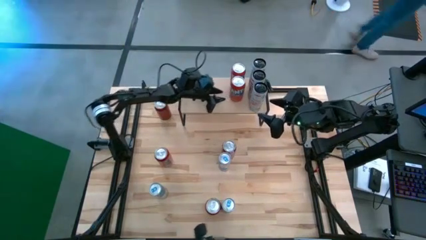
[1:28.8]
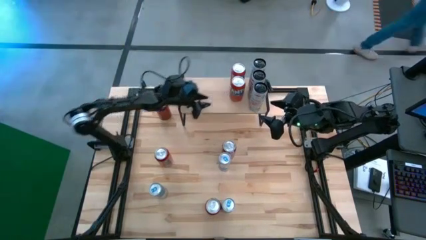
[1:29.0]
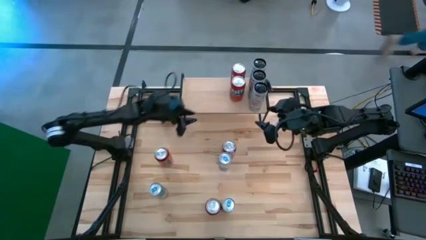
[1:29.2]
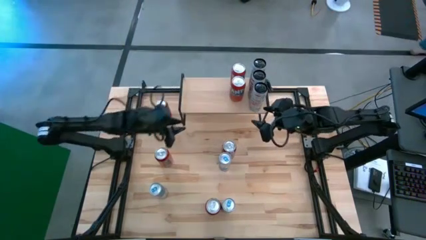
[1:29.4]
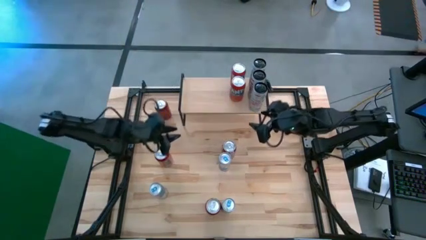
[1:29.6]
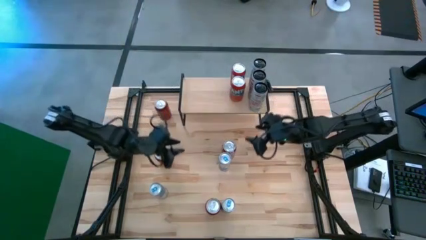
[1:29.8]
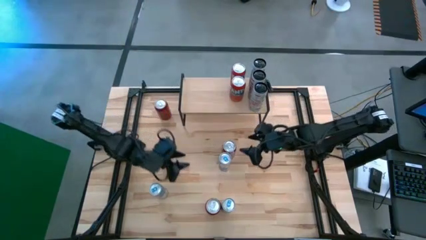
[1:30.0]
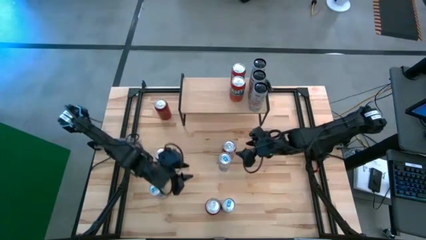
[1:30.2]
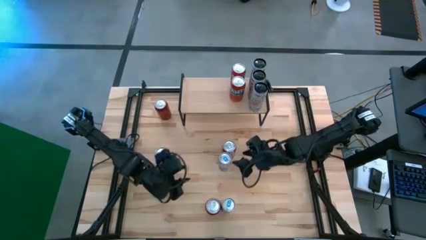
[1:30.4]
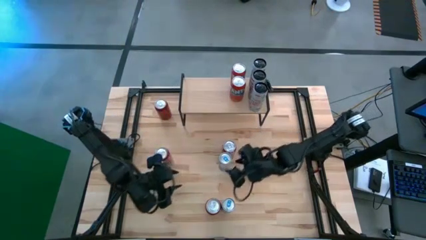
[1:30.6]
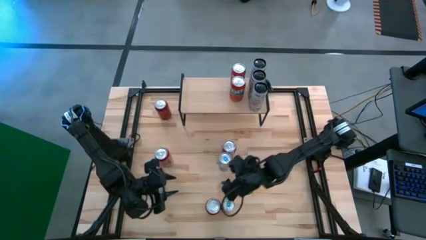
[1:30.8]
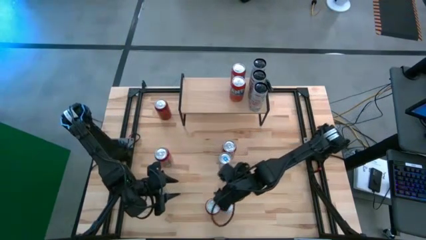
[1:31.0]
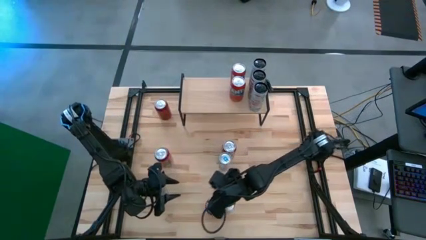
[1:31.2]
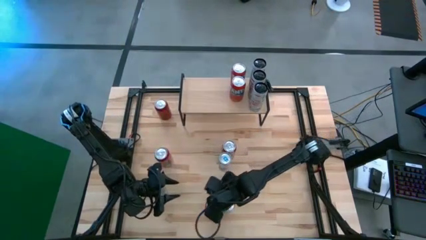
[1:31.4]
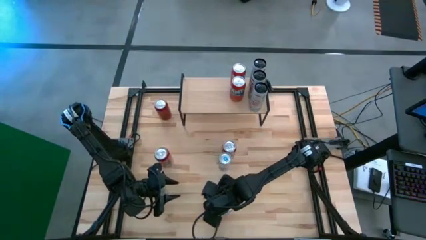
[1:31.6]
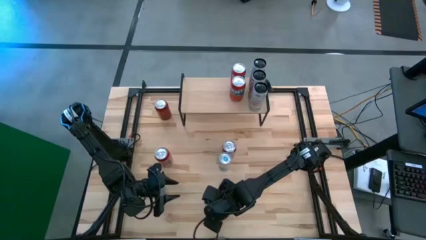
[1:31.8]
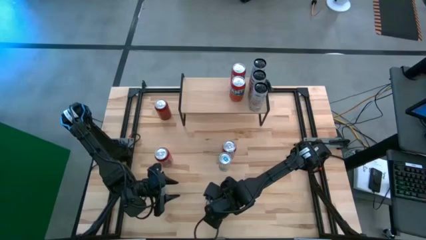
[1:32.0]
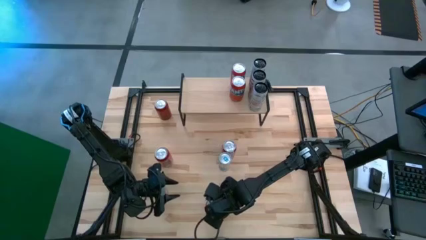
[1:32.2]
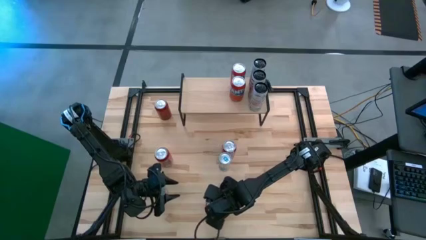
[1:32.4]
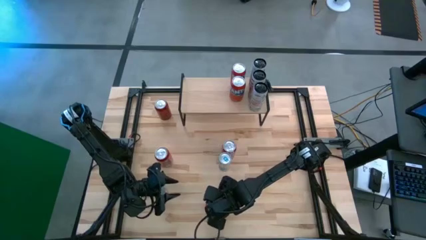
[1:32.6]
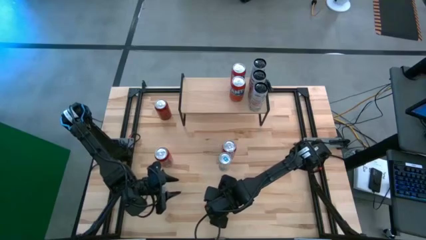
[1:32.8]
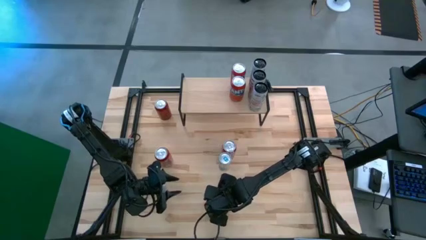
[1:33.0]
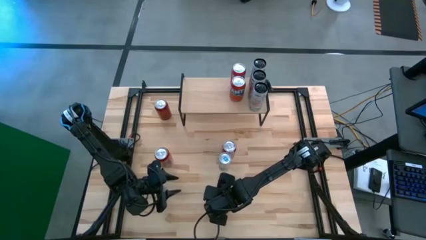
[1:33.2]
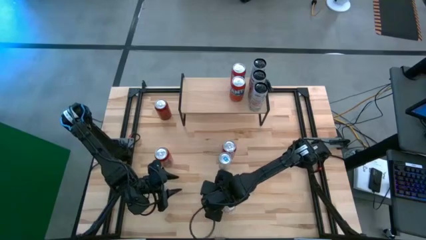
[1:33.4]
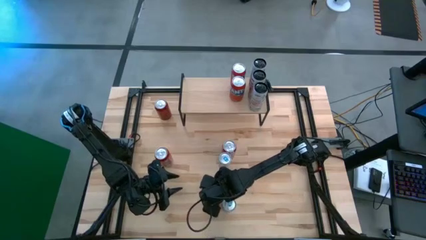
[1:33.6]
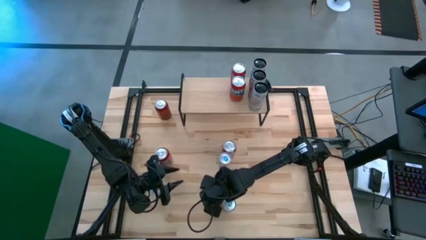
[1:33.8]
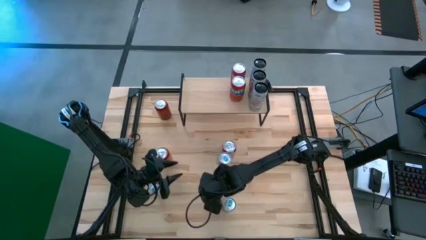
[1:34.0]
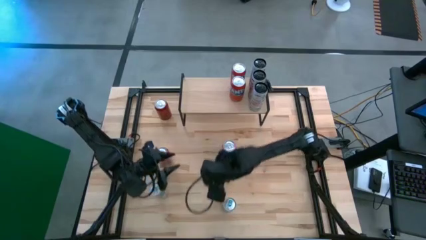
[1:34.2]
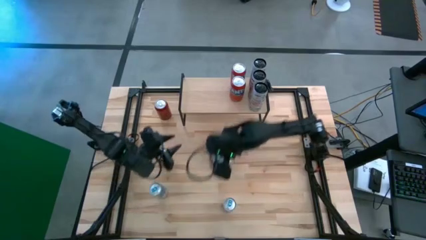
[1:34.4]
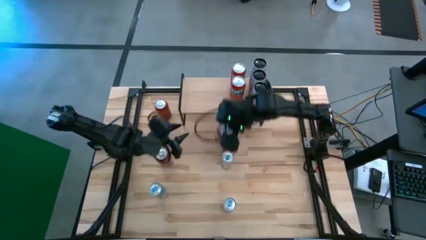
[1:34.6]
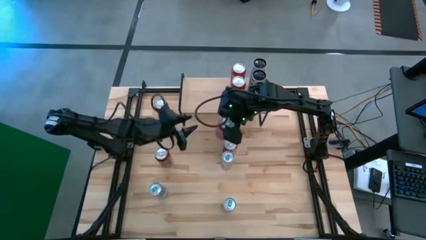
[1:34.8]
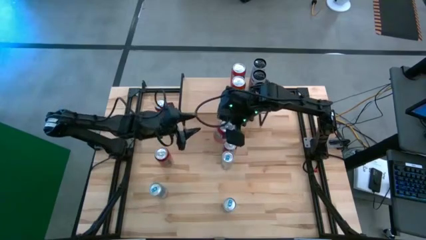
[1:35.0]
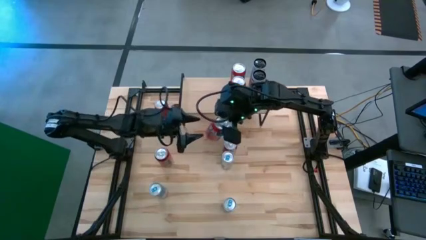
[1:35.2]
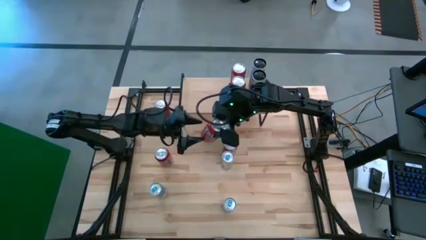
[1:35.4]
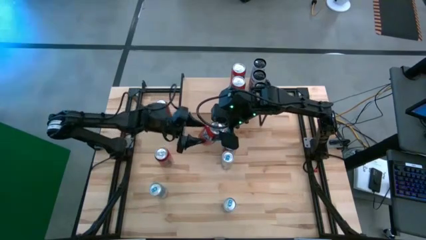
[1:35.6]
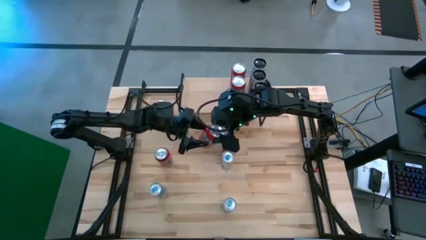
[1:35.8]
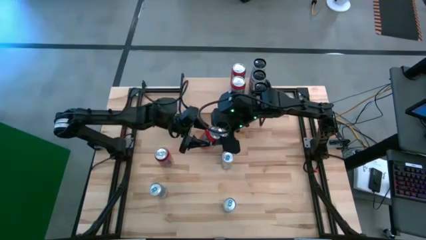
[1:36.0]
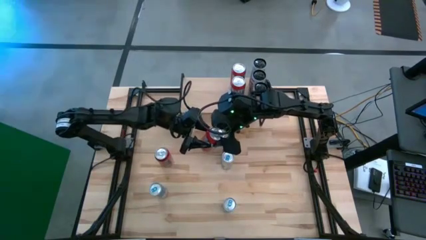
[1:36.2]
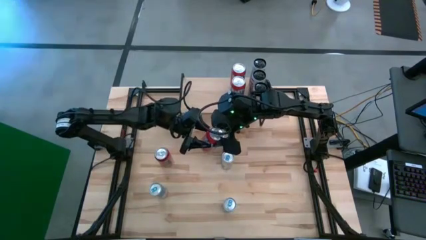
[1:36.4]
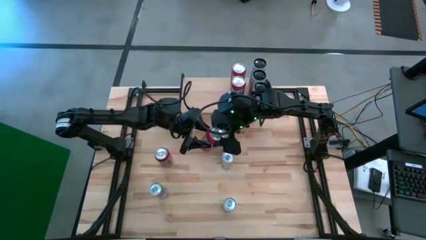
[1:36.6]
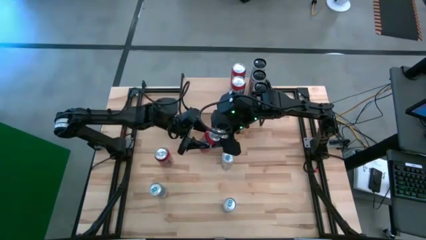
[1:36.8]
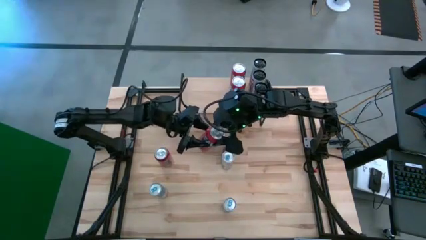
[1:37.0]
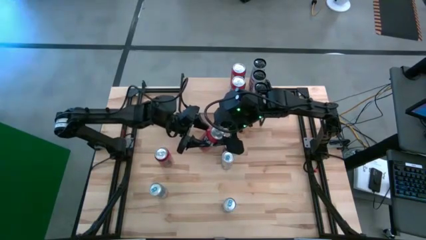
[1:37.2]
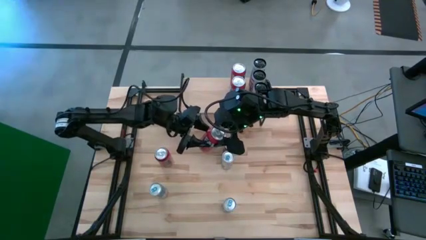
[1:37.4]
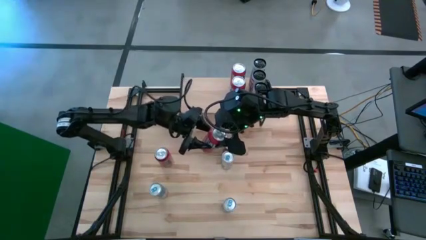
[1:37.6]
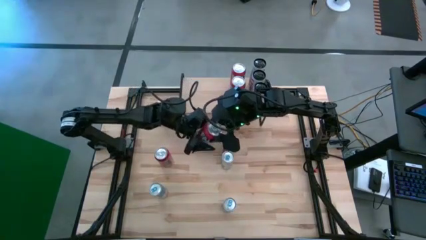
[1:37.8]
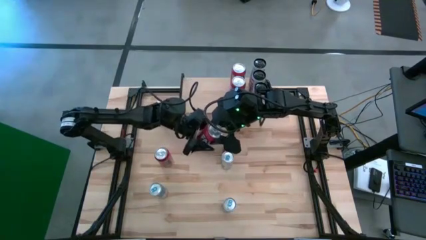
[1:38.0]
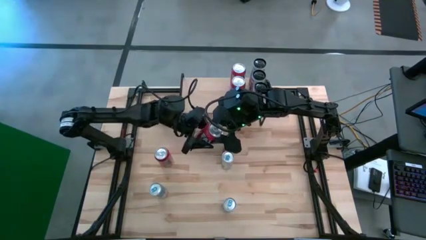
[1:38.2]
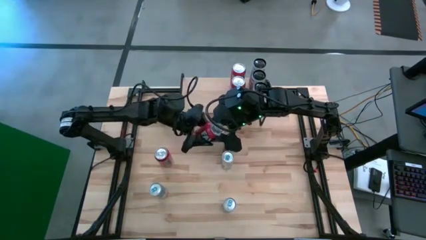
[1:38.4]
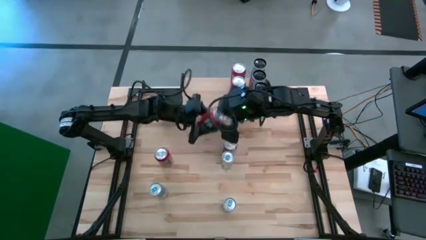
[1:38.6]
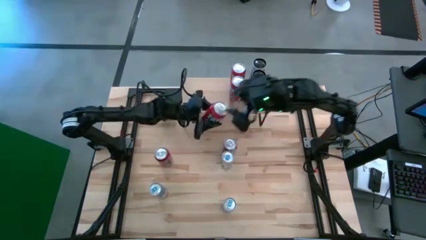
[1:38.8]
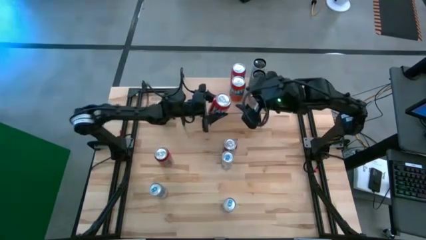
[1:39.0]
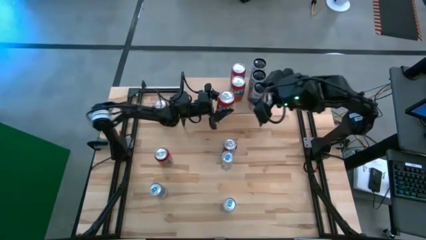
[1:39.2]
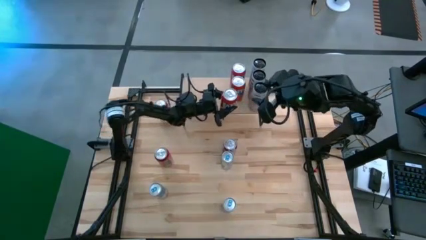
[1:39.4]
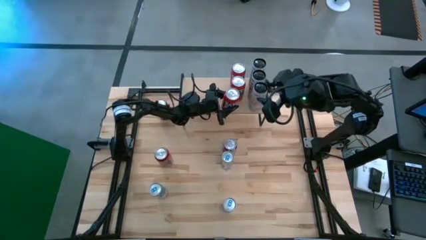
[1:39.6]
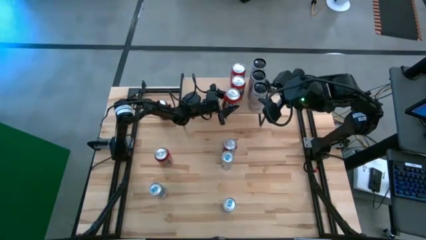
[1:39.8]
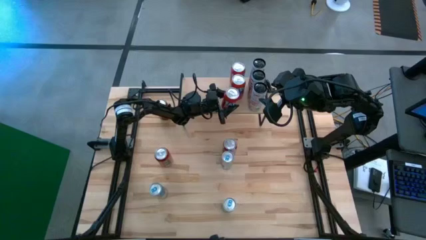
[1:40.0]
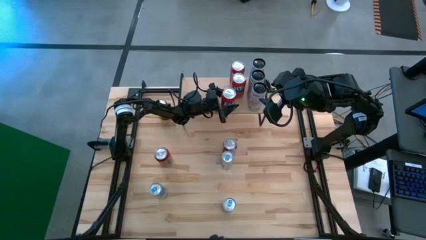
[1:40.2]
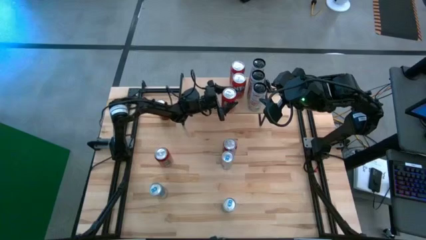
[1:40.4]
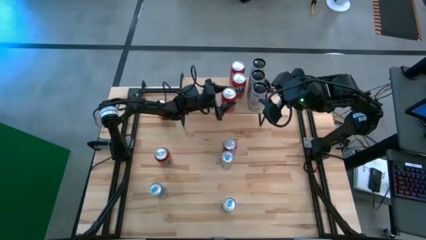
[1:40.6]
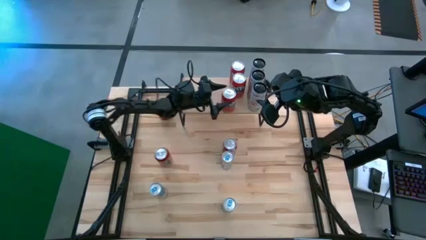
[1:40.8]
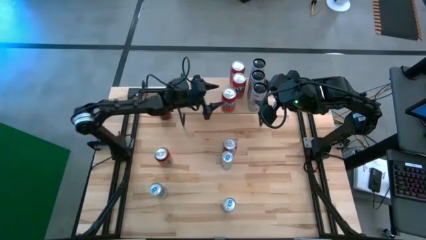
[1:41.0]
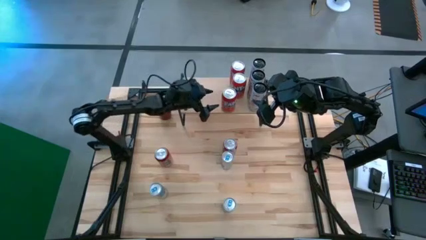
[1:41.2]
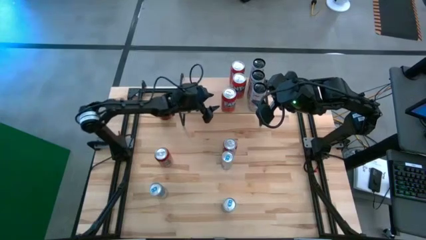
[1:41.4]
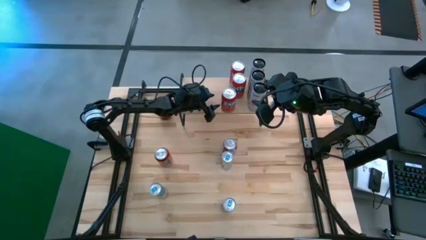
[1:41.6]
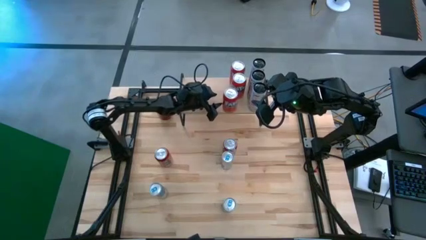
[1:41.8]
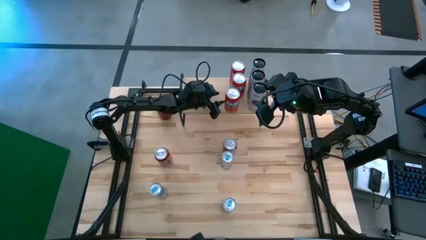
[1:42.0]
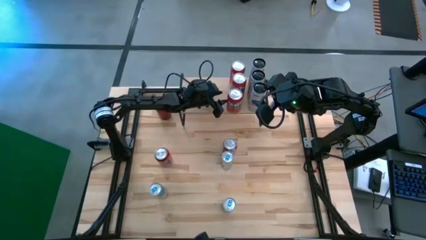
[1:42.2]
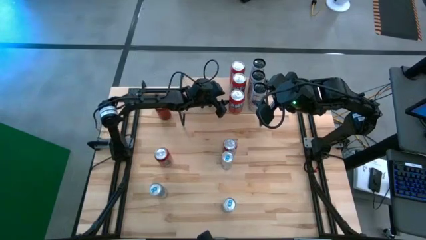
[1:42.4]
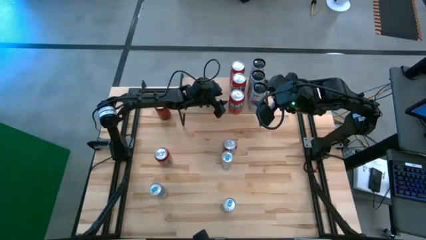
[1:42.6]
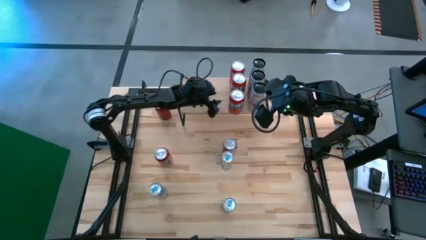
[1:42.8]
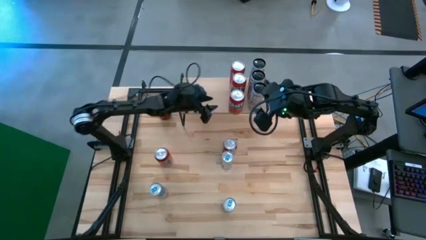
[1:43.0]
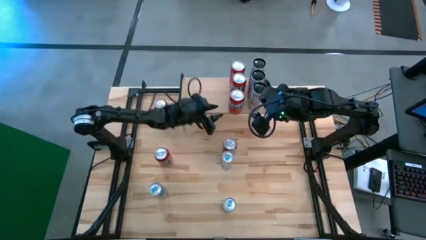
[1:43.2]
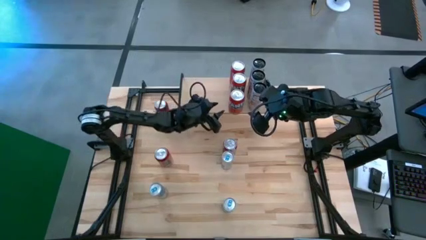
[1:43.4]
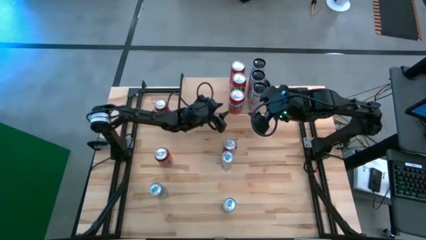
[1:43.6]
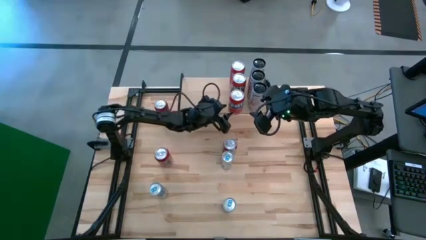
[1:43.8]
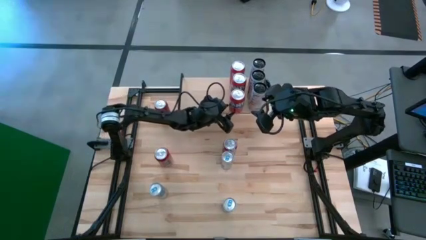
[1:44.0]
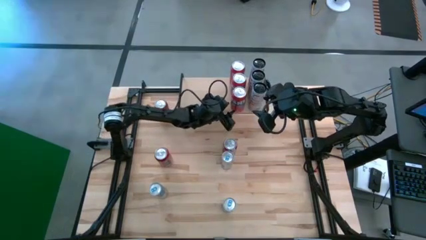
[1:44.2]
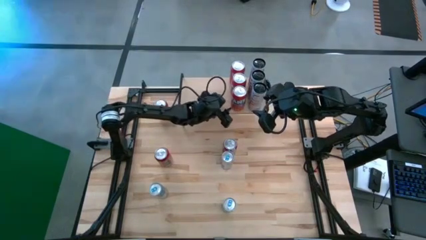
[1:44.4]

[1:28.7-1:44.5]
Task: Place canned beverage on shelf
Put the red soda can aligned with the other red soda cans on the shelf
